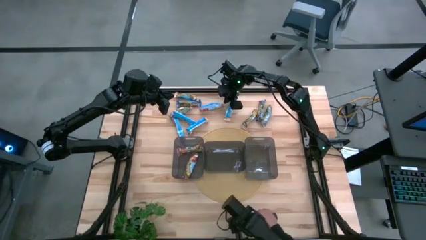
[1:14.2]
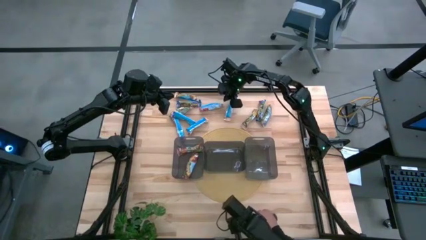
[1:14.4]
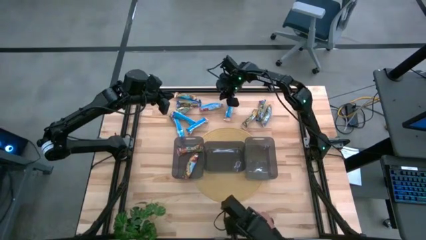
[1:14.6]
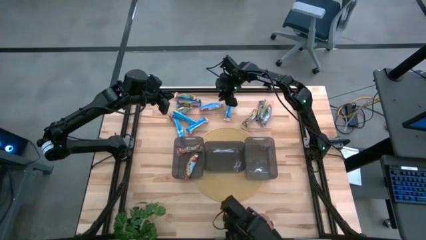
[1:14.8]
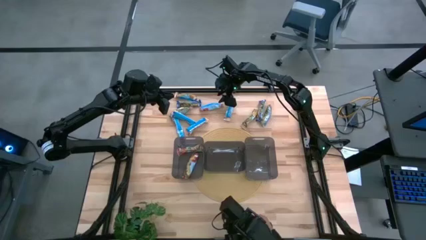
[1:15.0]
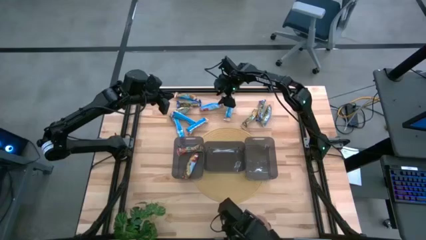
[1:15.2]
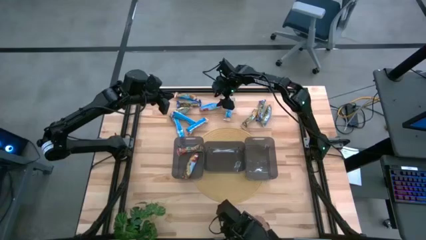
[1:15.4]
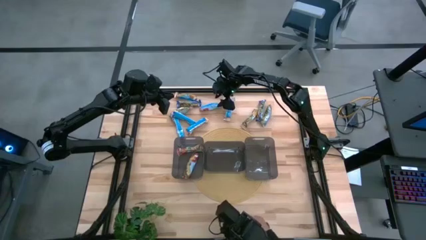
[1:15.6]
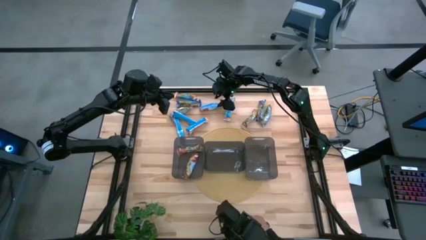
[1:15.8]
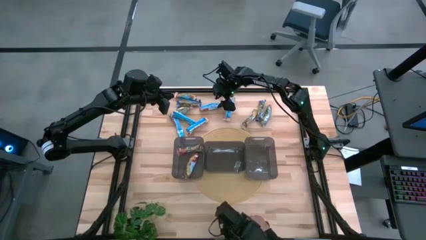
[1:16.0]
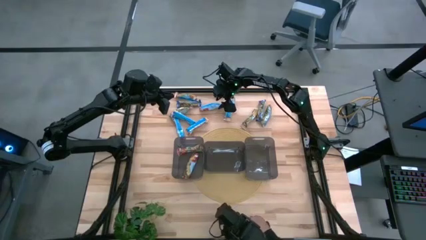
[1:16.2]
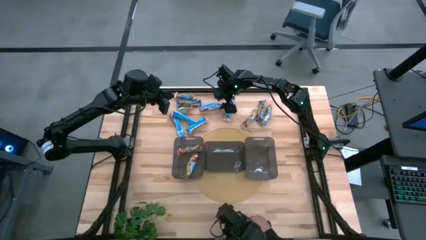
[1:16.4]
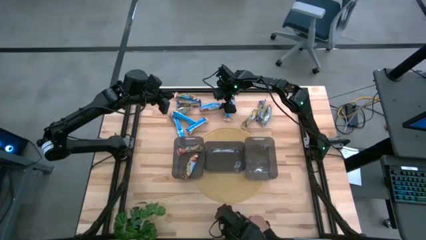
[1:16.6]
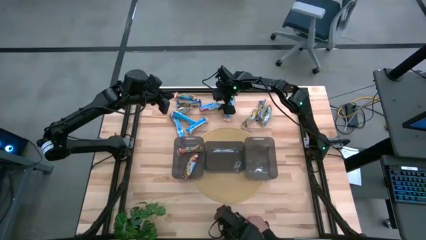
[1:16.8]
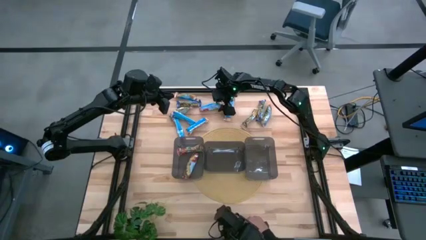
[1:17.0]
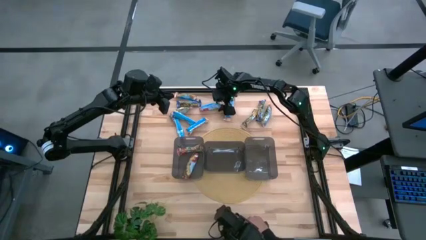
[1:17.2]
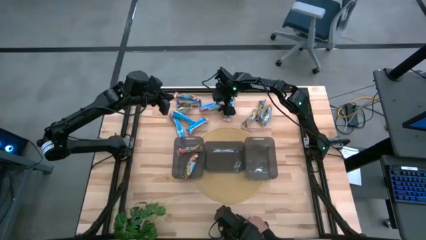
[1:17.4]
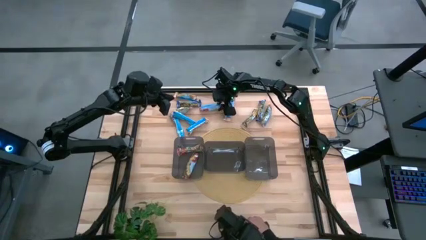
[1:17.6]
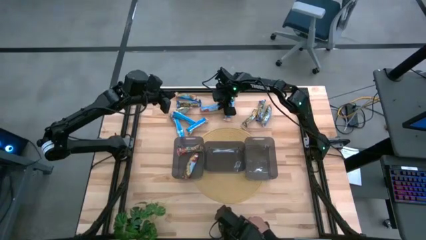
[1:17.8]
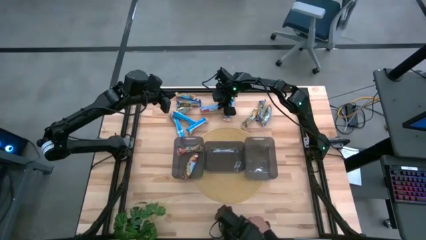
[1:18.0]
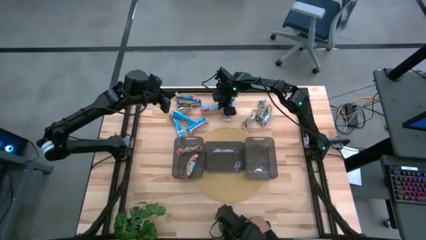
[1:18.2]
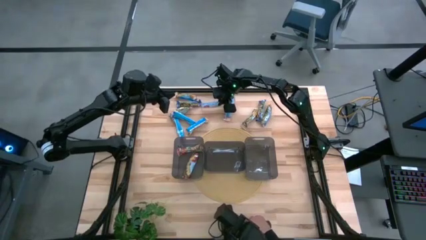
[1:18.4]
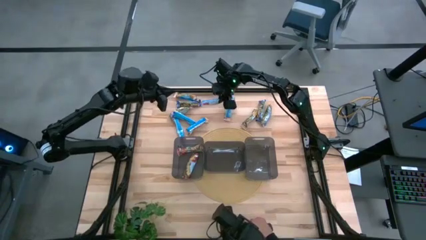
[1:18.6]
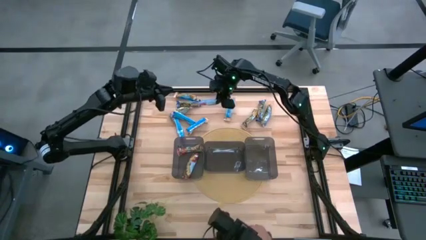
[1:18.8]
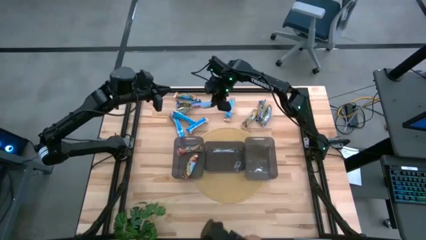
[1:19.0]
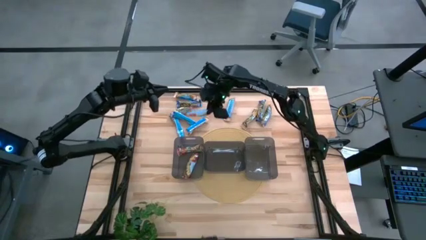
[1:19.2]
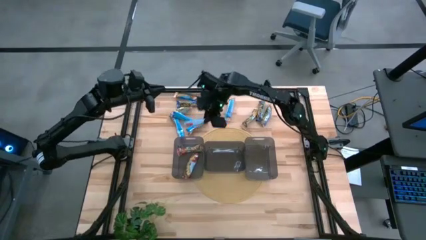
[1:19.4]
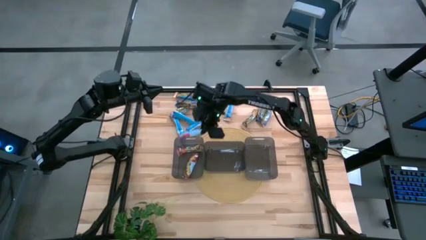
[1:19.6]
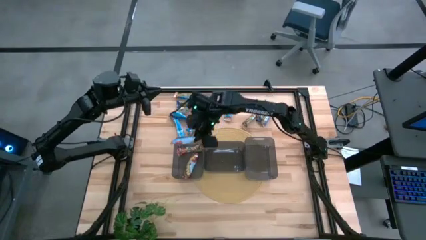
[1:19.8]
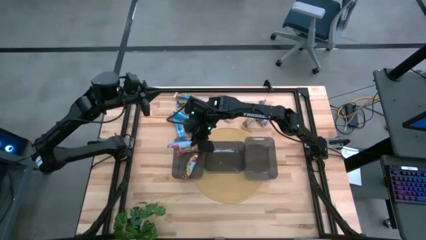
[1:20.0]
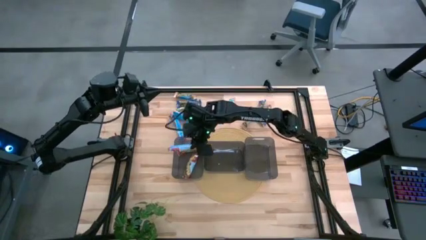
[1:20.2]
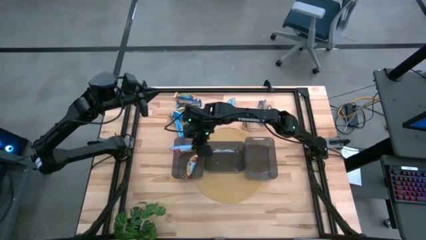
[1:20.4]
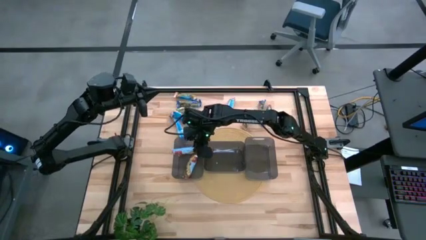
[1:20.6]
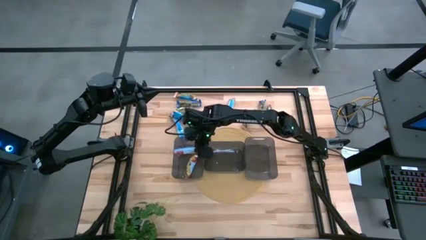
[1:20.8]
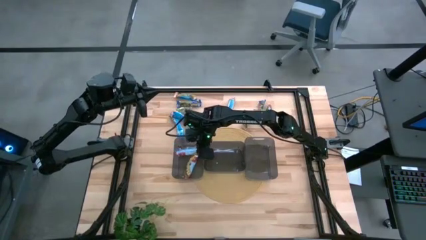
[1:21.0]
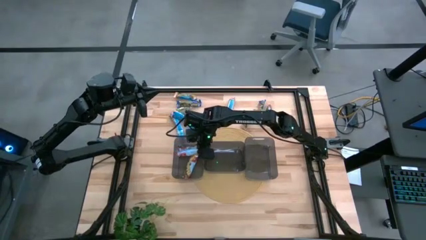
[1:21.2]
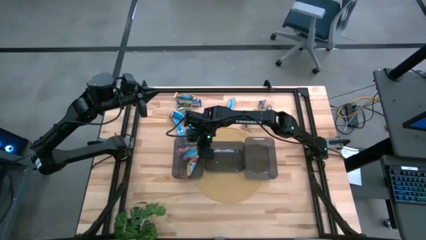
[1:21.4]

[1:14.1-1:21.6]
Task: Pick and place Granola Bars by type
Put the red granola bar into the left black bin

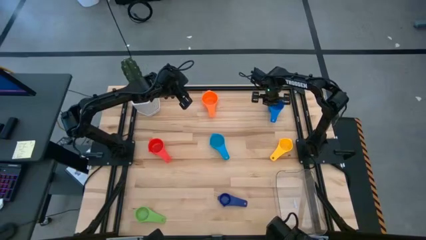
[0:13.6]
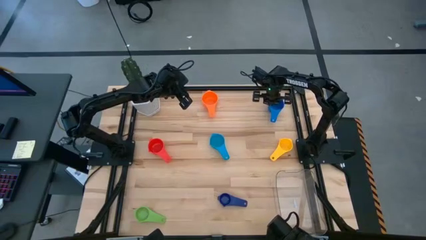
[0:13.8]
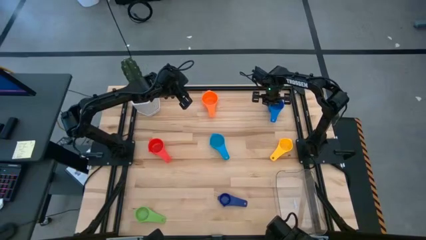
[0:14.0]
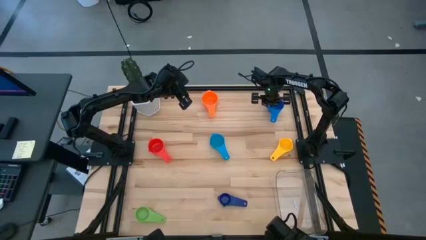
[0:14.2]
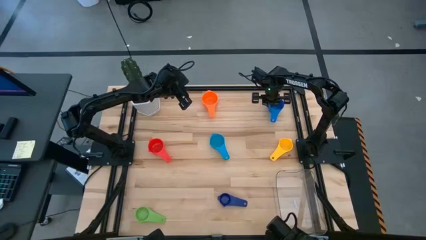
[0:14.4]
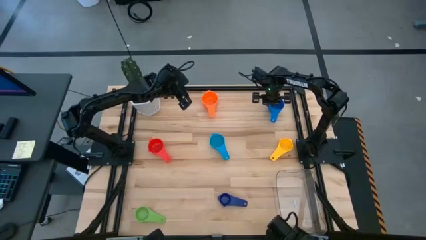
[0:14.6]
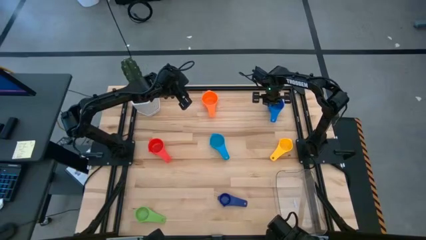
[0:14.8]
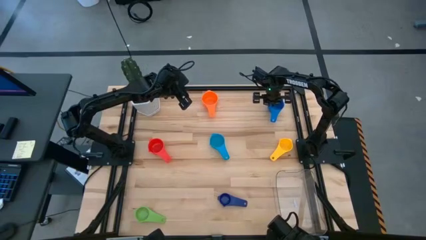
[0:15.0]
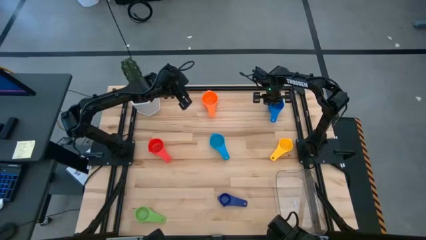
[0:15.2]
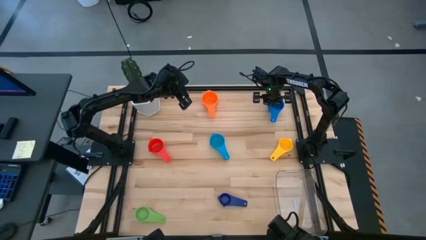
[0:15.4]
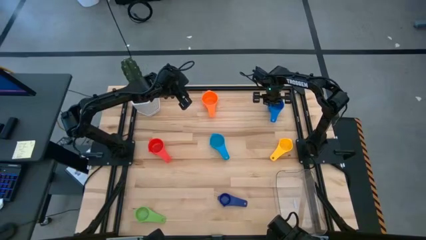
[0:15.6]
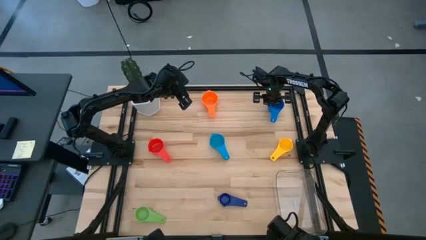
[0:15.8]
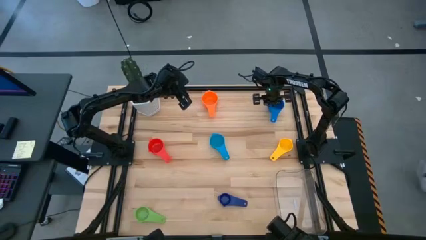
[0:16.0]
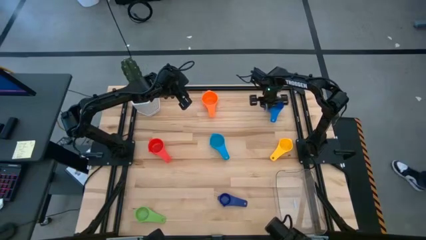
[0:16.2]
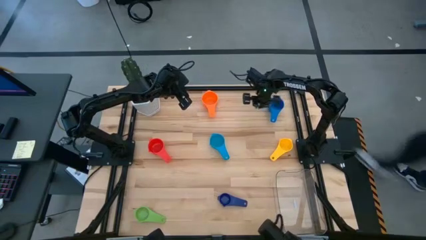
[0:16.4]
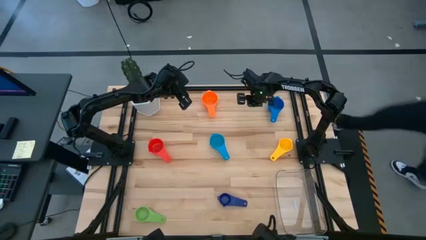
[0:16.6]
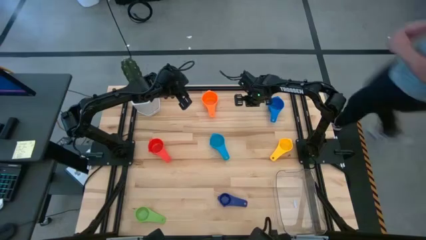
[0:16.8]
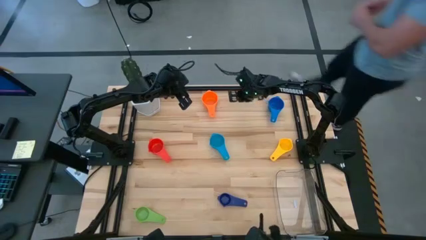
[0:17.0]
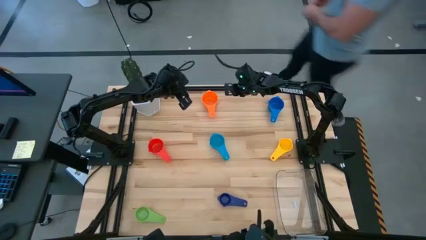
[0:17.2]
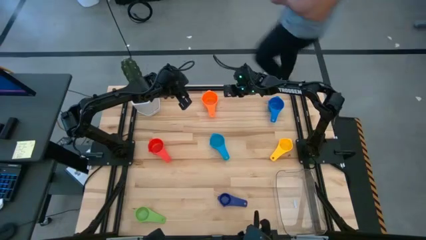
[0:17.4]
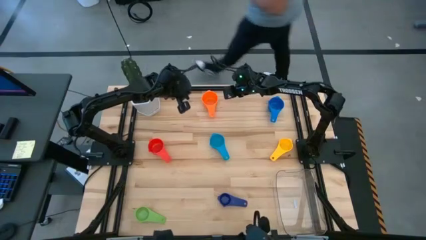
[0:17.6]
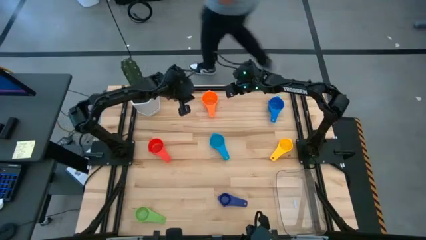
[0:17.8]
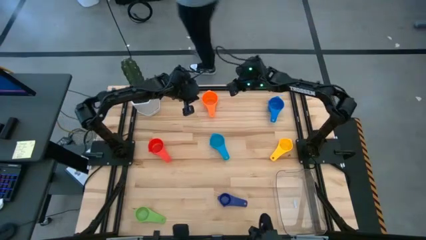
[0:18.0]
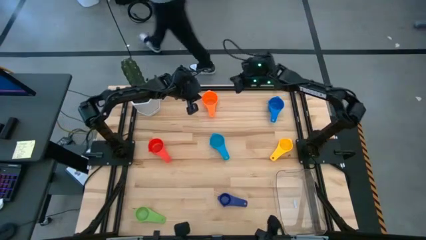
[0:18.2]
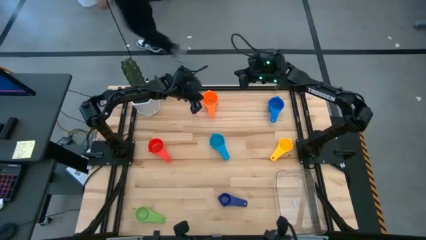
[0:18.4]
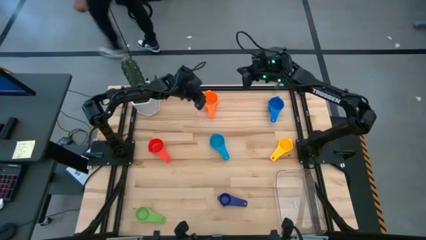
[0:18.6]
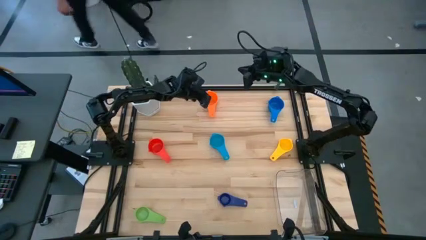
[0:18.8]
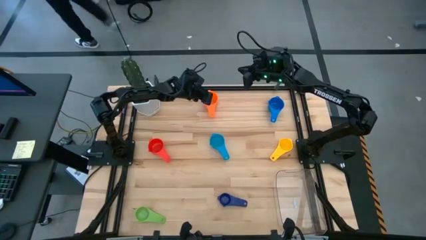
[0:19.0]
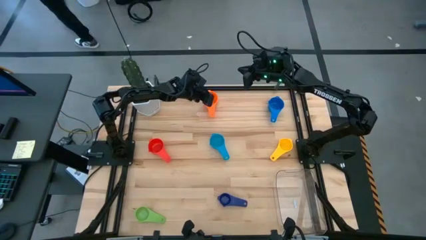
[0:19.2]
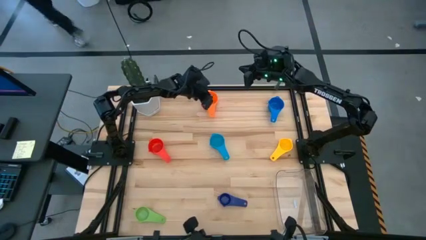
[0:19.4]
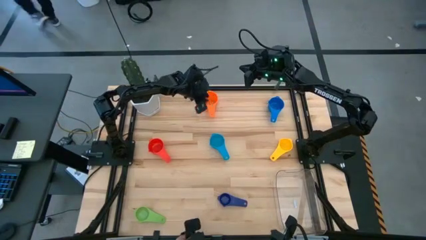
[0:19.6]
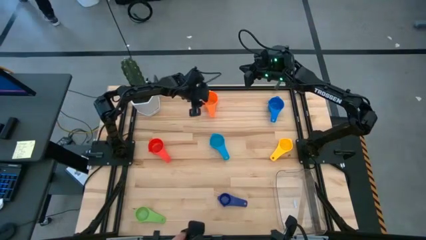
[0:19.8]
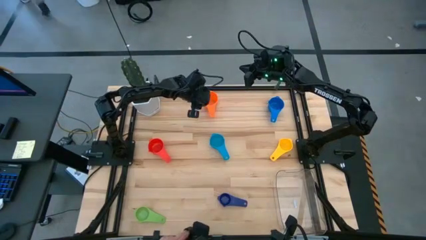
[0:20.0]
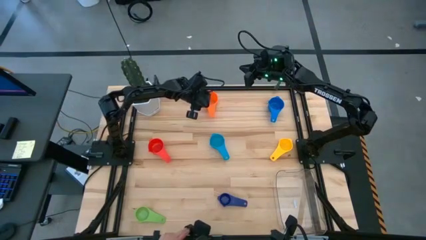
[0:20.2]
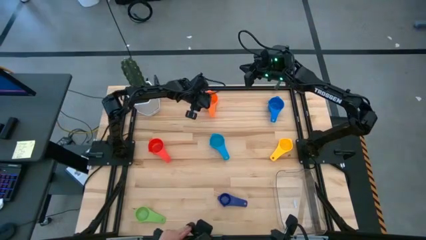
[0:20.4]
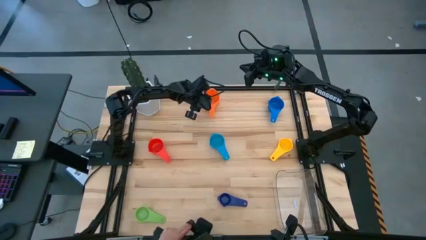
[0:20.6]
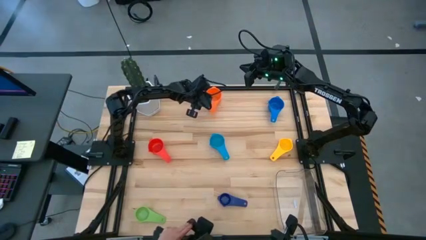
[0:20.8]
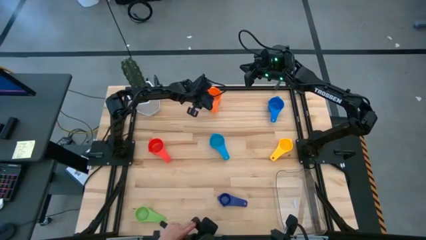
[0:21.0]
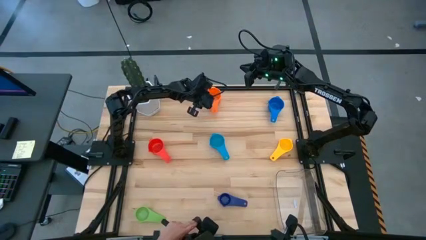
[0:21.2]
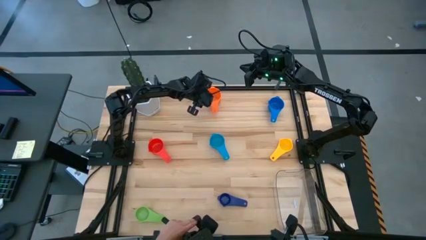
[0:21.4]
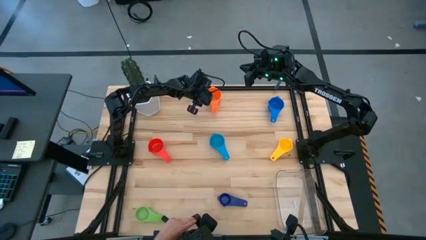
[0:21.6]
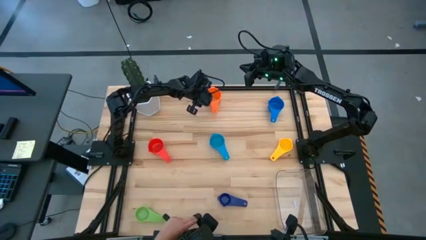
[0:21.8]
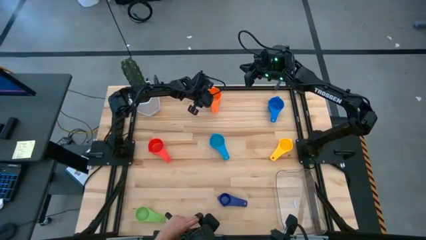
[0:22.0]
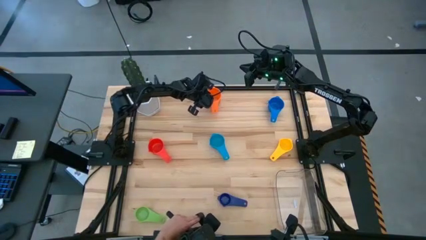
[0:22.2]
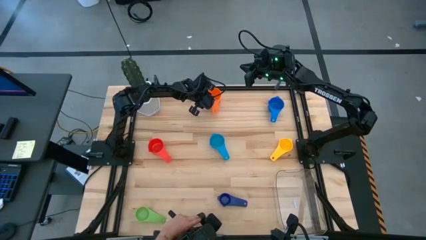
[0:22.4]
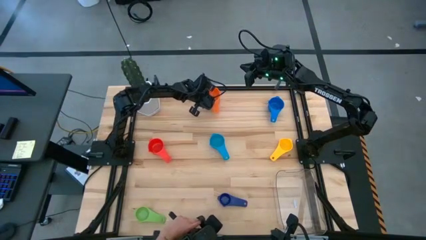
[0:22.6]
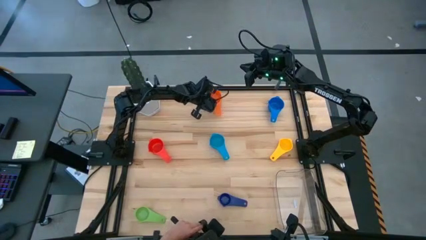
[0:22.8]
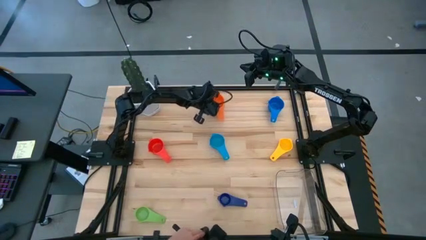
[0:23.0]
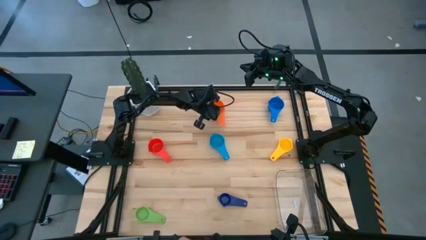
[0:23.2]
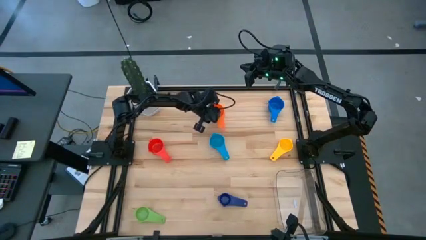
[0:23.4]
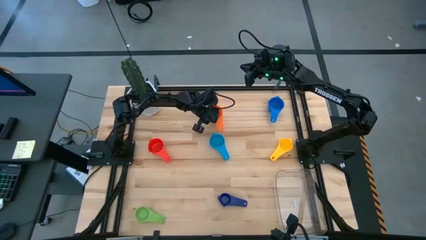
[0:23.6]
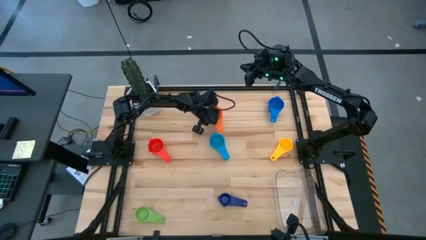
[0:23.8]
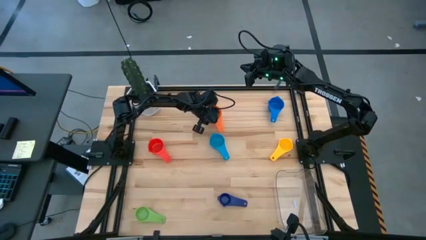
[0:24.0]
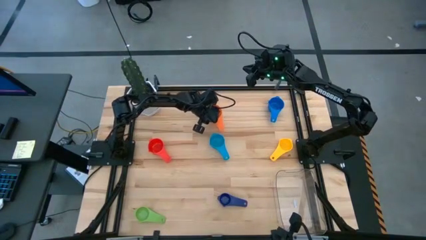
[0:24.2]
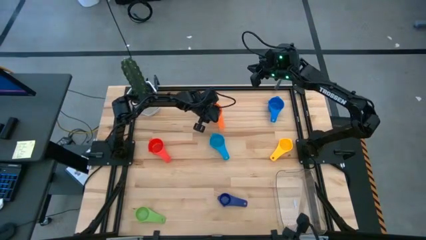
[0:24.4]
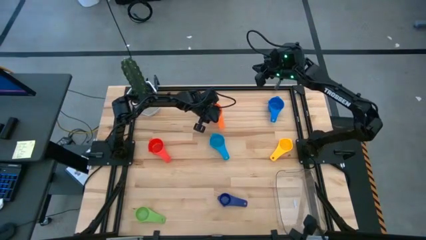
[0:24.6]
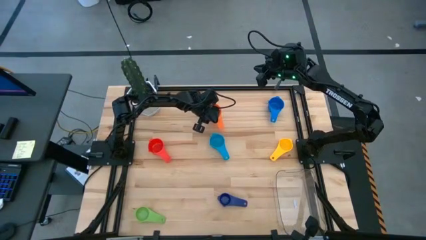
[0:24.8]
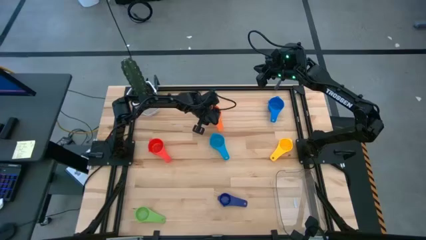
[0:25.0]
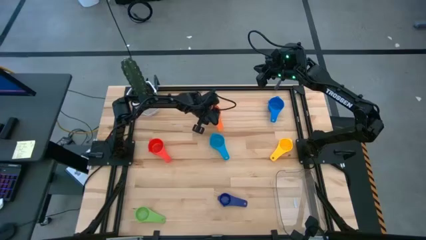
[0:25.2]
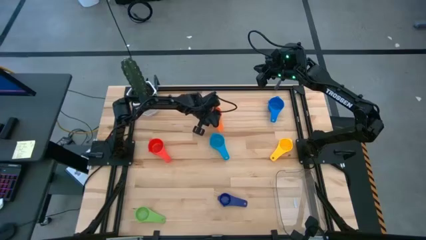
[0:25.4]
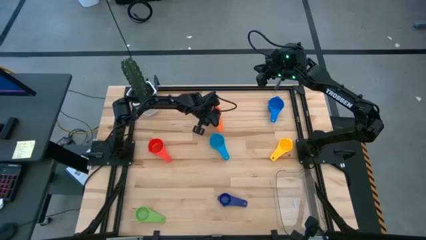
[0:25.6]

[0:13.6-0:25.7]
Task: Nest measuring cups in basket
Adjust the orange measuring cup
